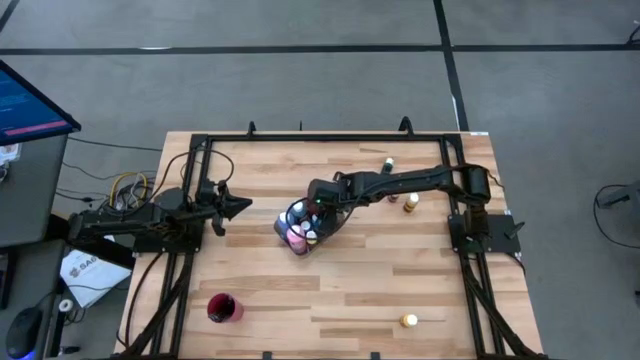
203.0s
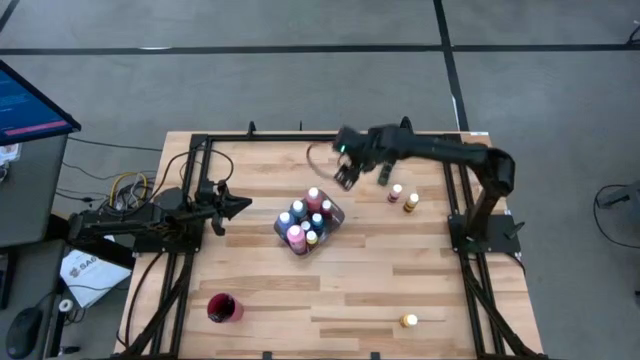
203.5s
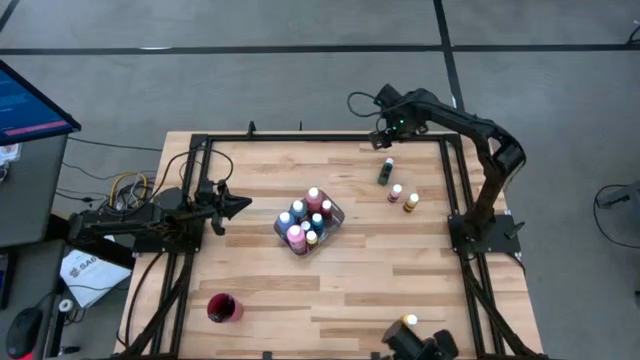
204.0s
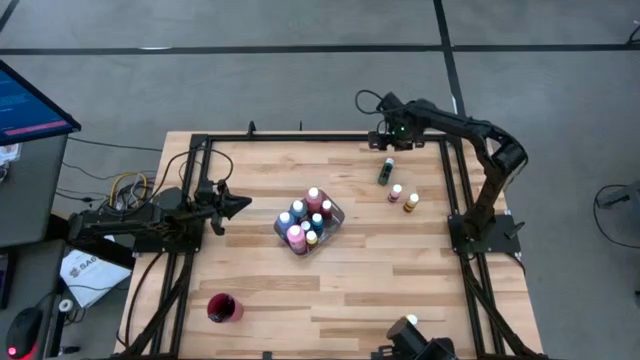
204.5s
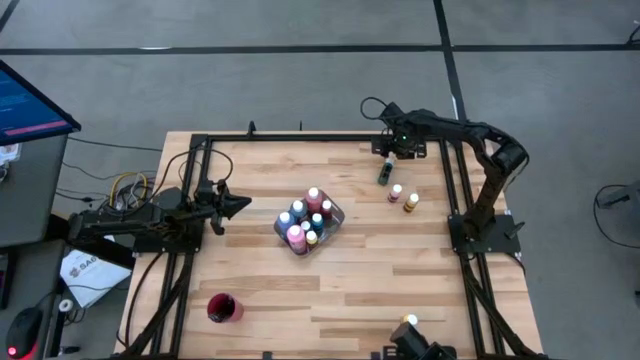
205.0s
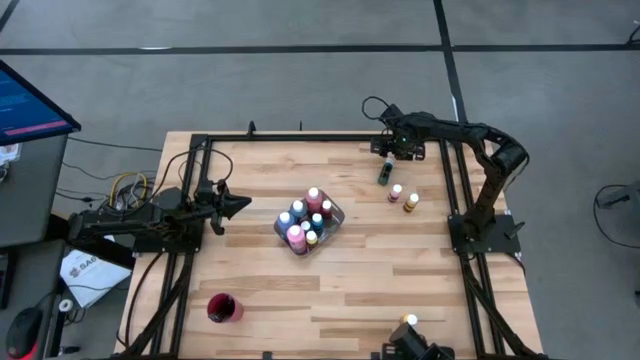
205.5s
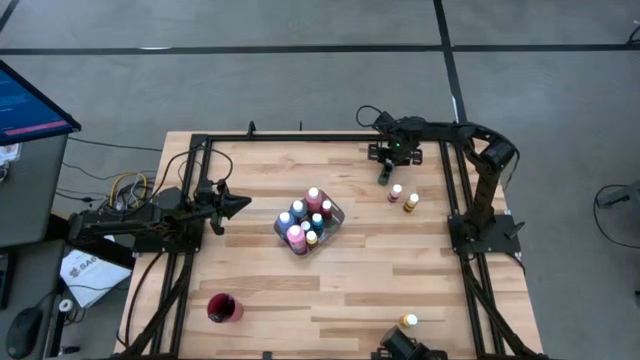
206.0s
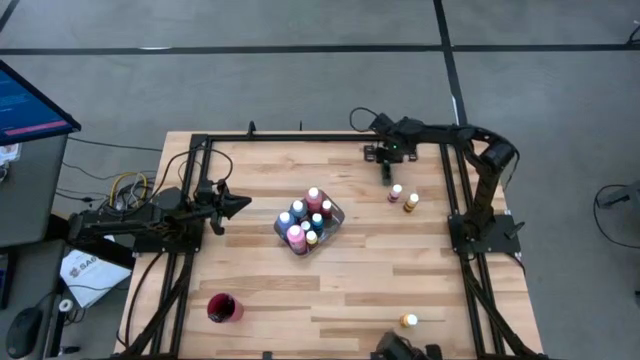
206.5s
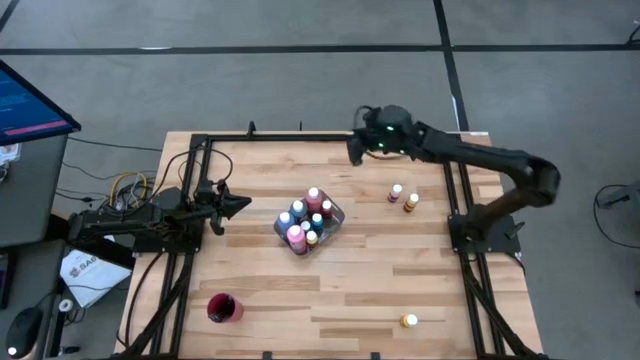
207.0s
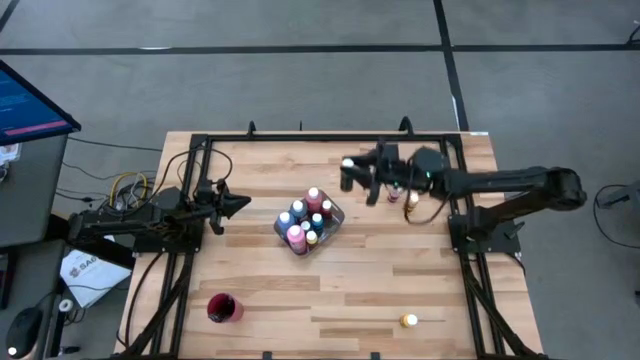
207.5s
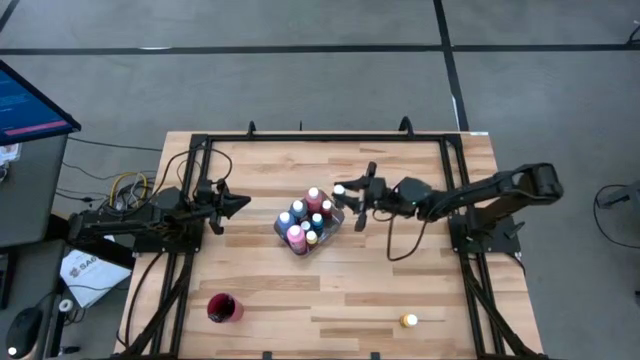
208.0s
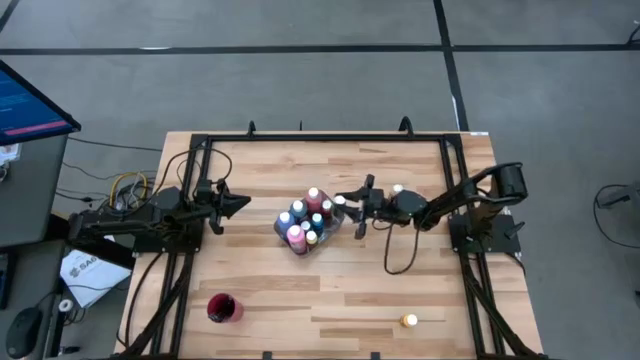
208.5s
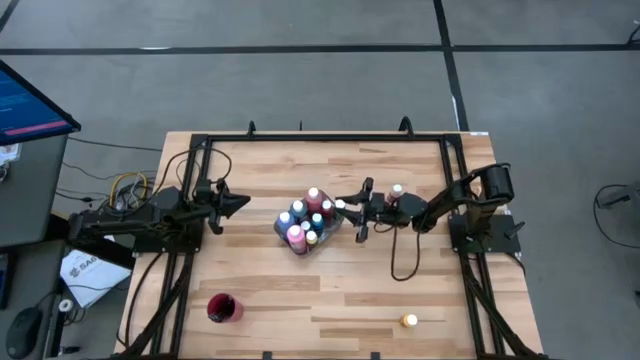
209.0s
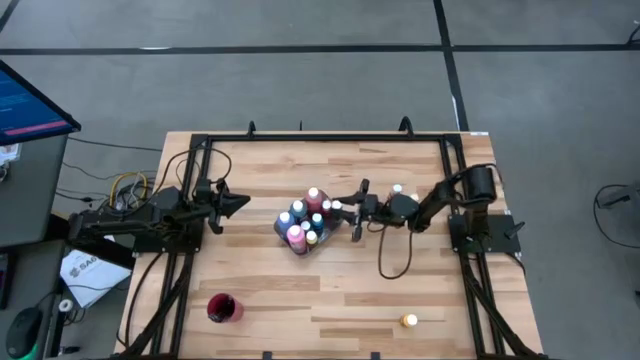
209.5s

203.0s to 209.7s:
Task: Pick & Place Paint Supplies
Put the small green paint bottle into the black bin

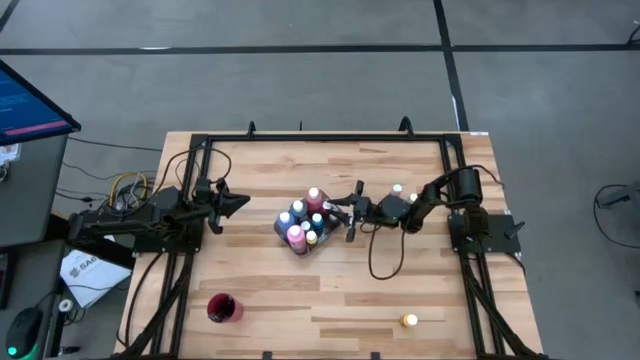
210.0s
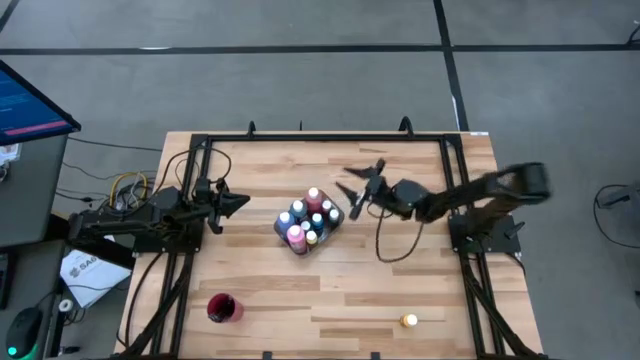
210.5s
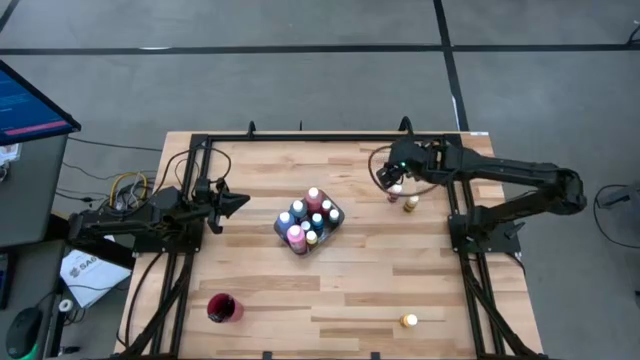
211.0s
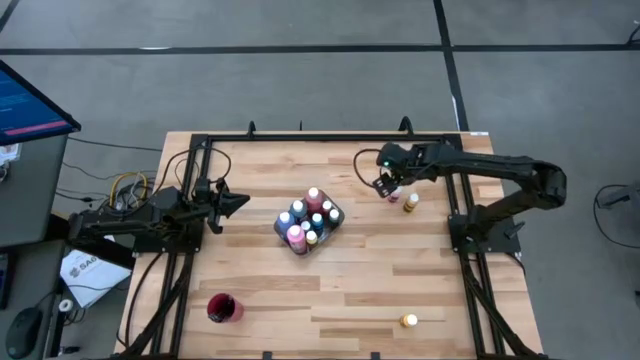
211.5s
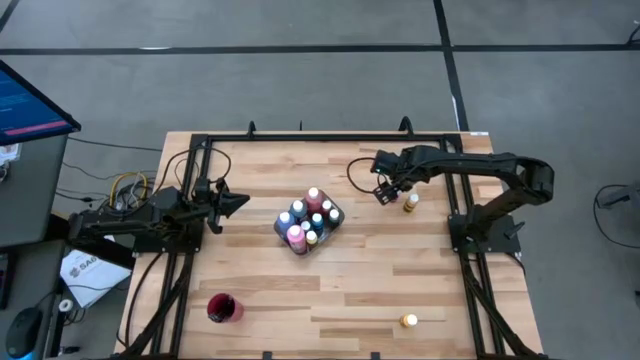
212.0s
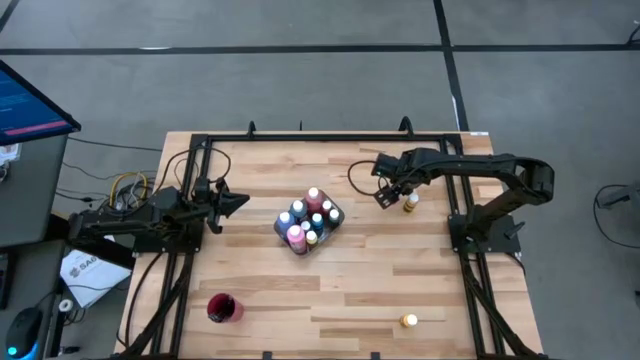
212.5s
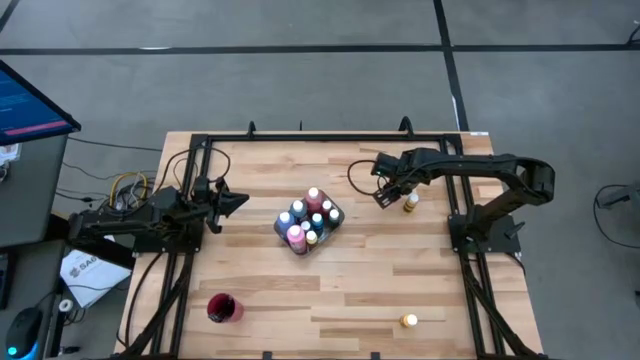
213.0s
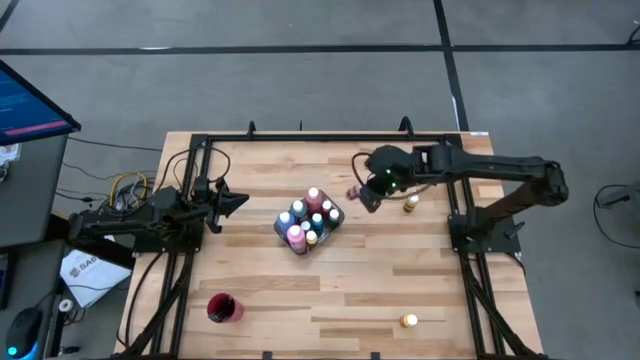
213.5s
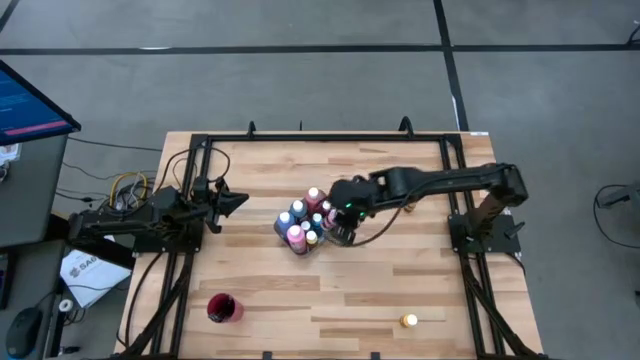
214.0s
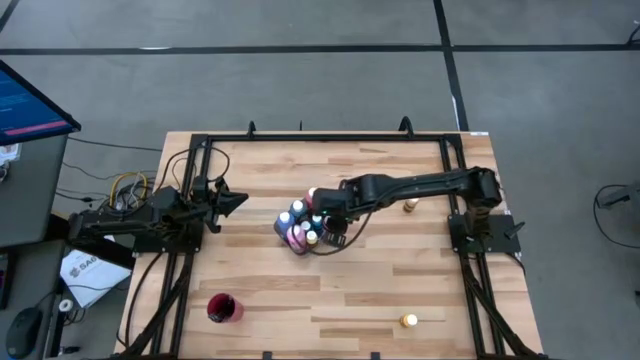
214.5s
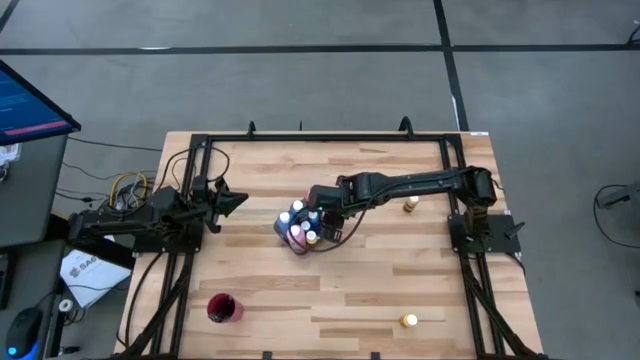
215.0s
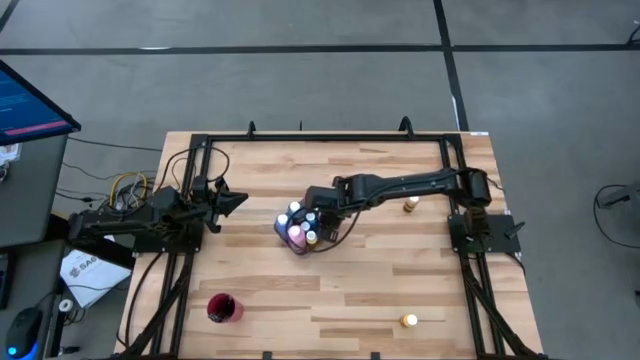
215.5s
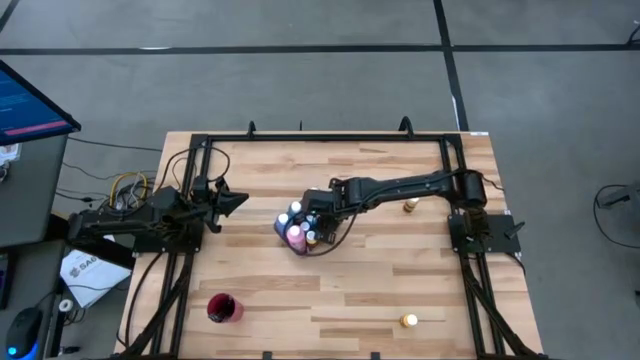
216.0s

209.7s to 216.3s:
Put the small pink paint bottle into the black bin

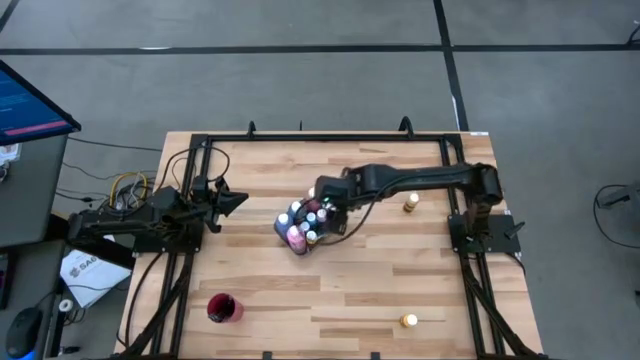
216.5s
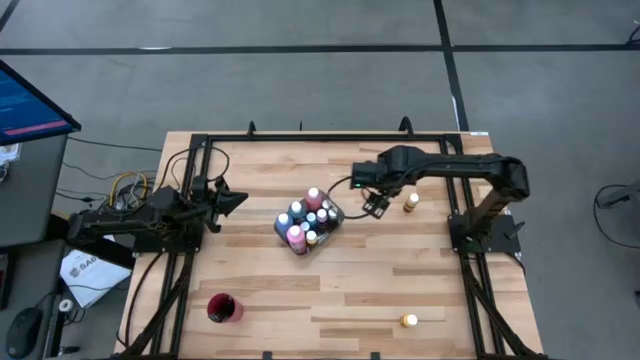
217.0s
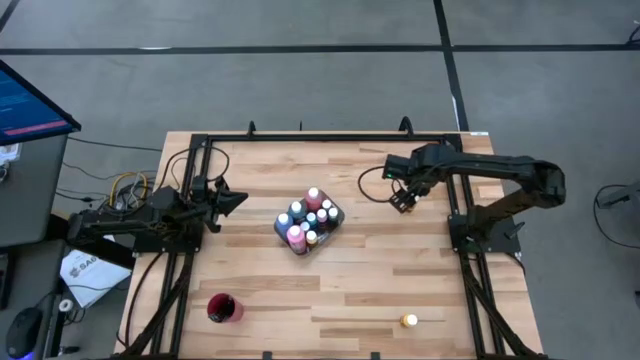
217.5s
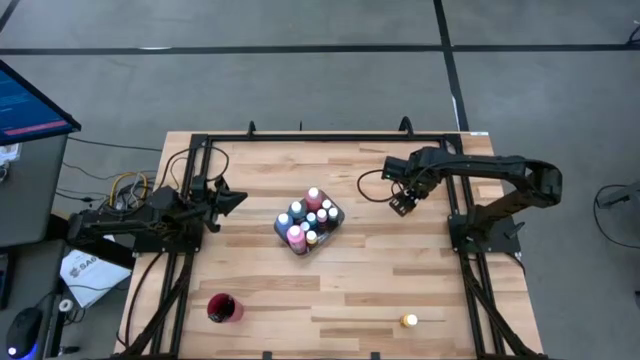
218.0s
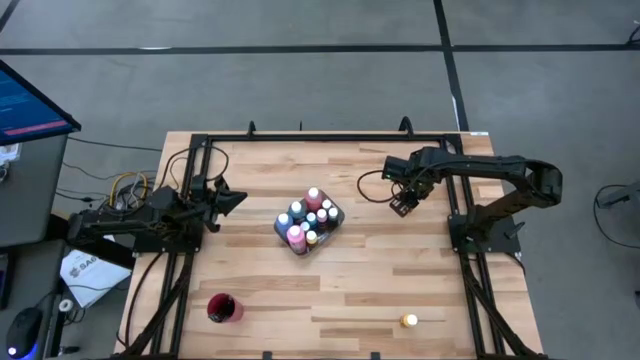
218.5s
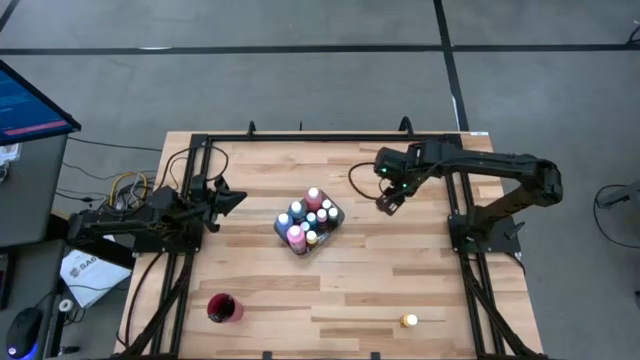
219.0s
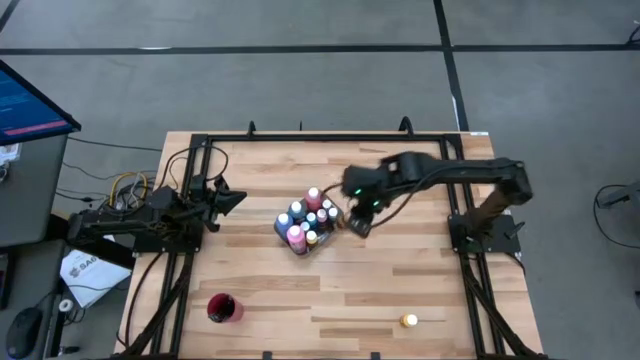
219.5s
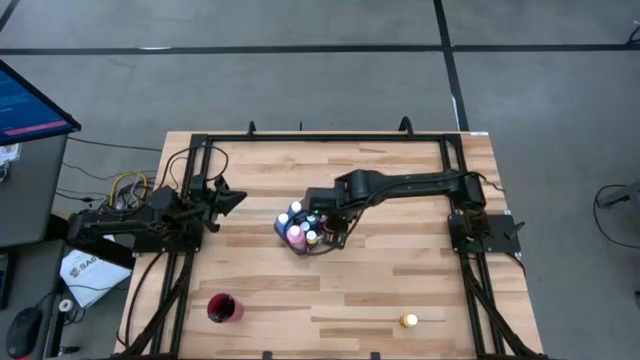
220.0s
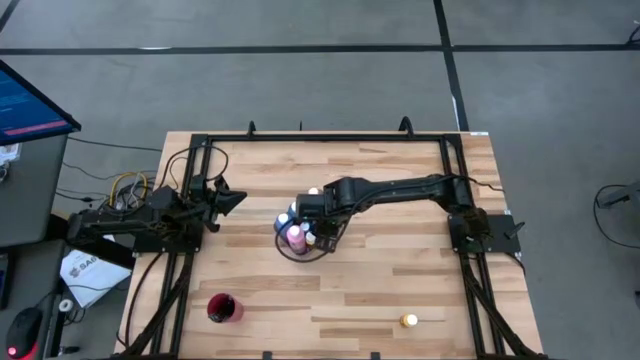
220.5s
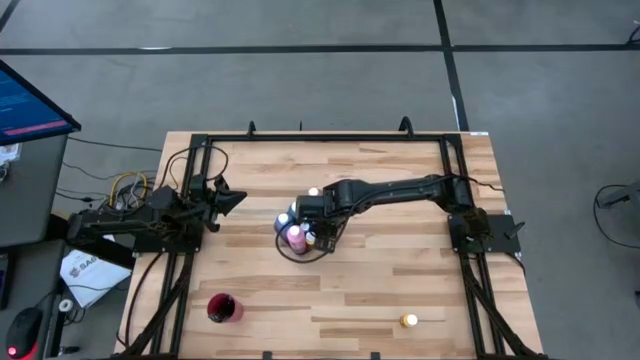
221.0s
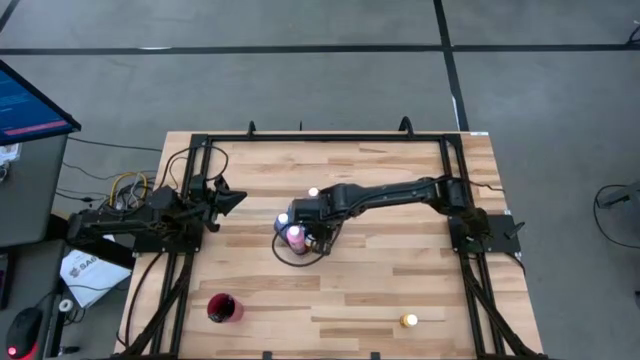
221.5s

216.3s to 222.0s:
Put the small dark yellow paint bottle into the black bin

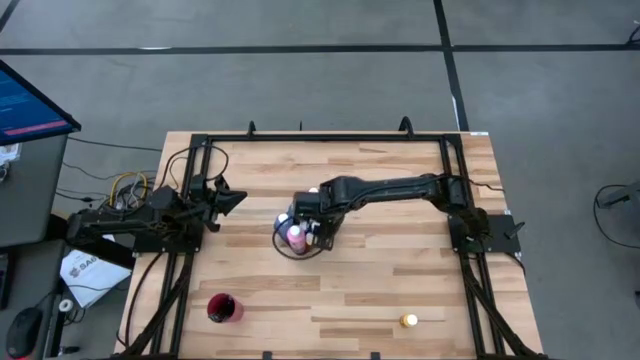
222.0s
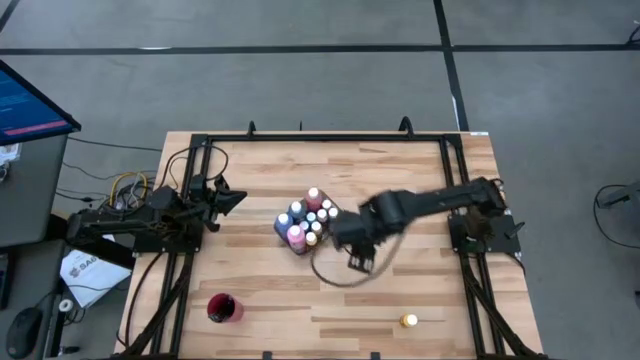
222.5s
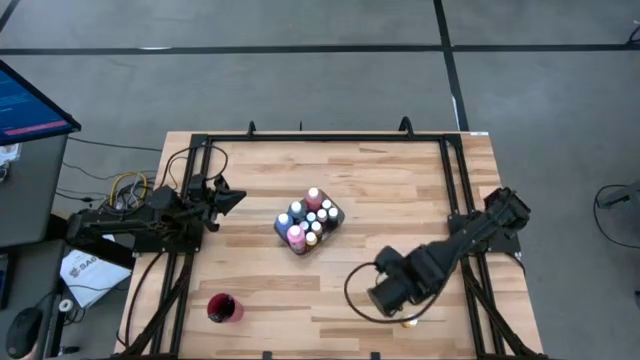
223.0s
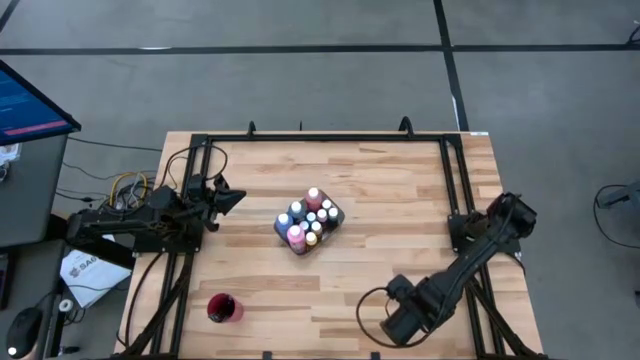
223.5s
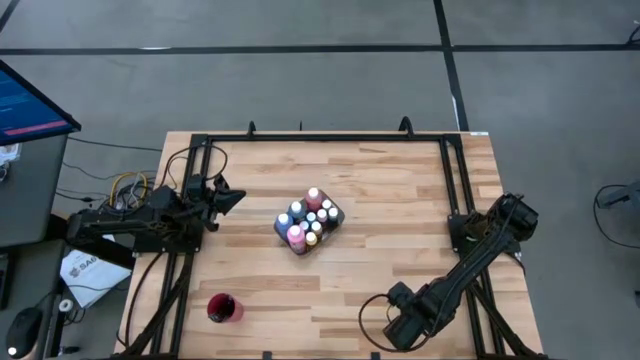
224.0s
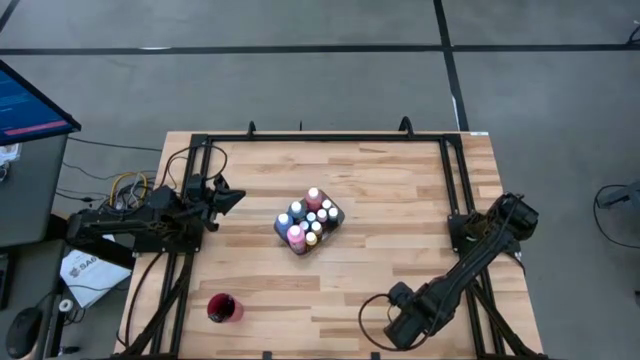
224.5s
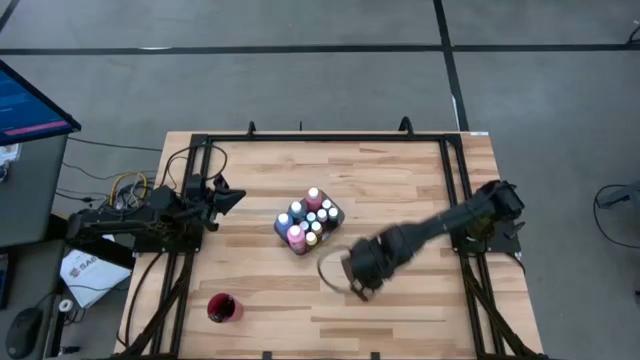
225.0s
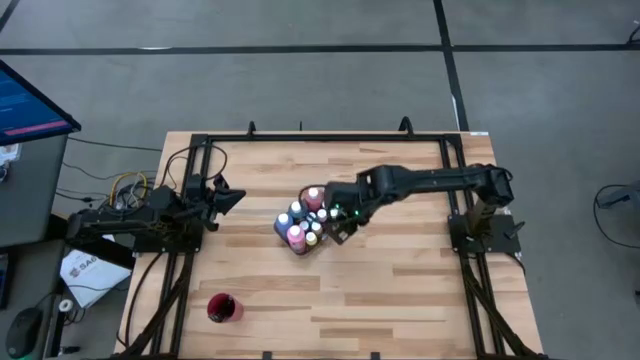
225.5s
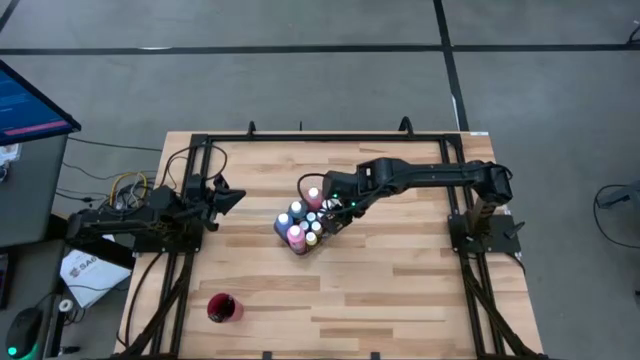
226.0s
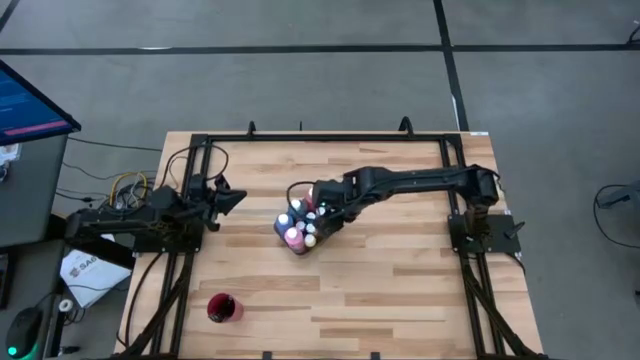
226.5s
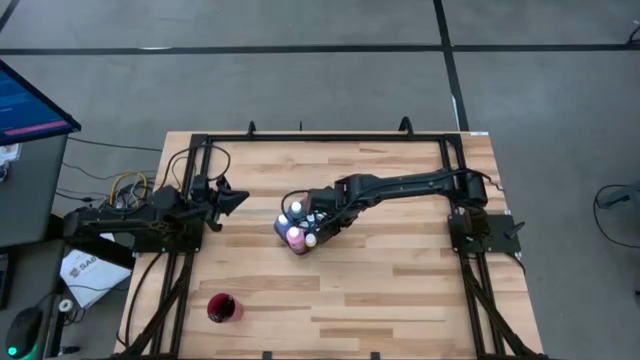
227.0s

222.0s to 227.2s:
Put the small yellow paint bottle into the black bin
